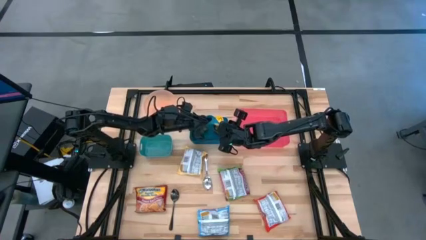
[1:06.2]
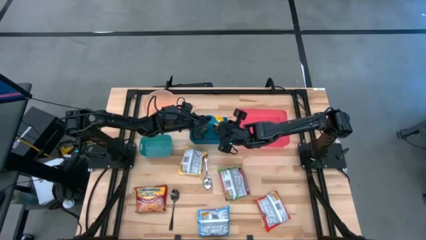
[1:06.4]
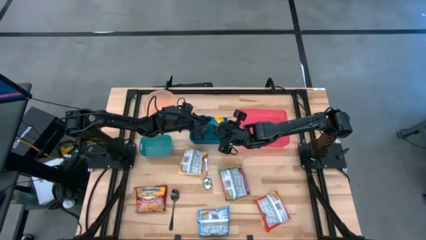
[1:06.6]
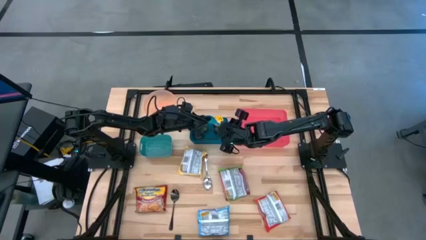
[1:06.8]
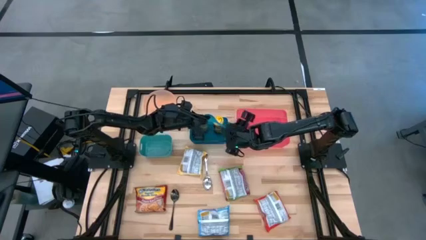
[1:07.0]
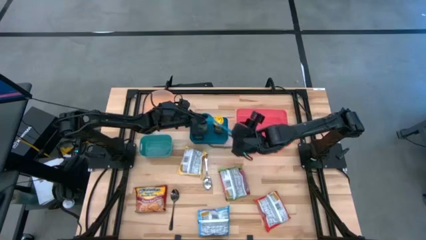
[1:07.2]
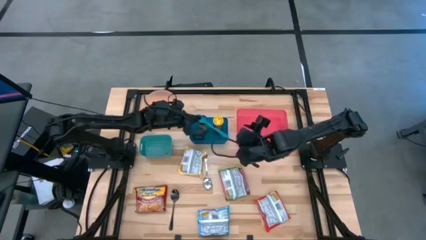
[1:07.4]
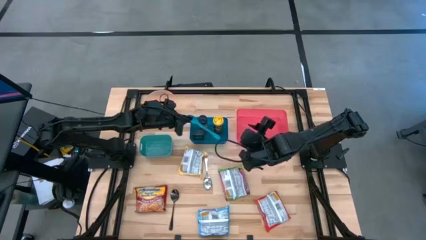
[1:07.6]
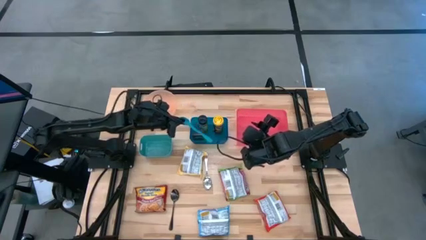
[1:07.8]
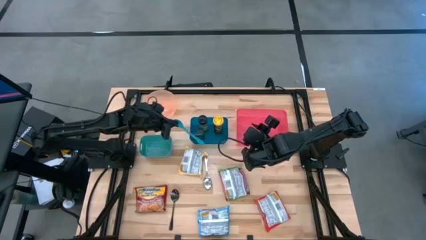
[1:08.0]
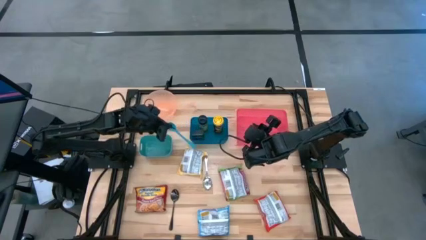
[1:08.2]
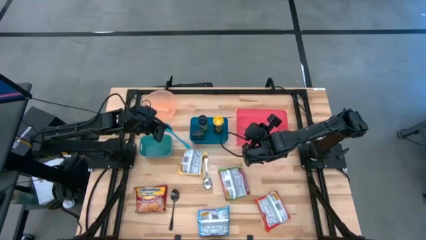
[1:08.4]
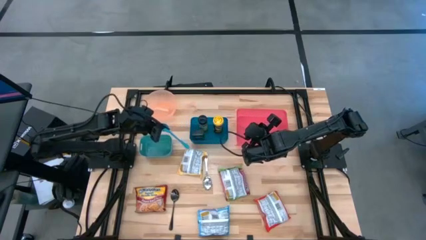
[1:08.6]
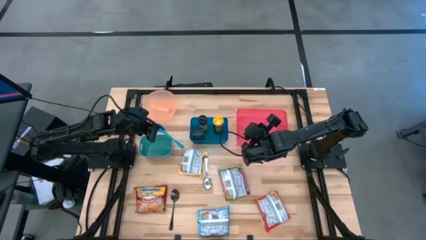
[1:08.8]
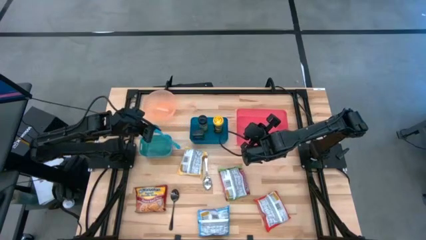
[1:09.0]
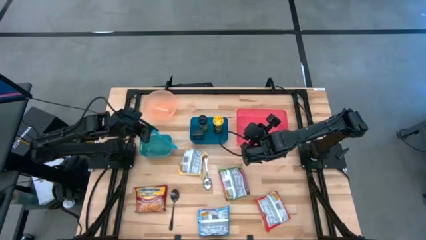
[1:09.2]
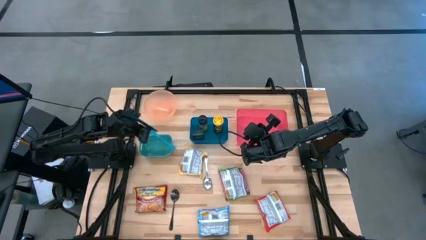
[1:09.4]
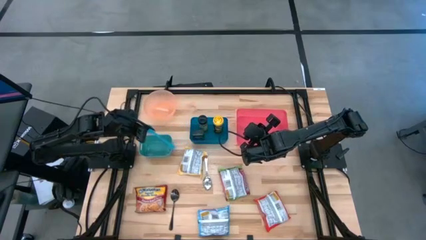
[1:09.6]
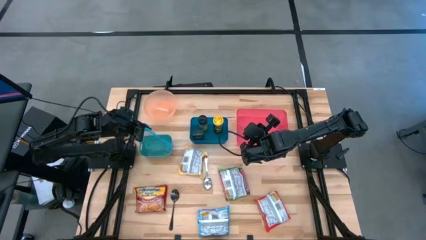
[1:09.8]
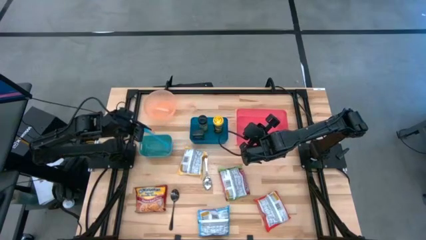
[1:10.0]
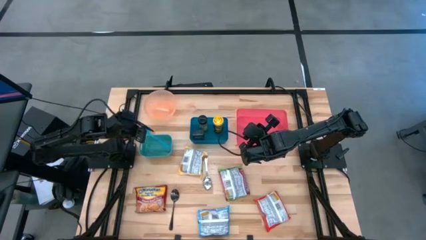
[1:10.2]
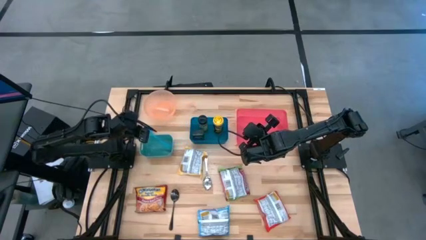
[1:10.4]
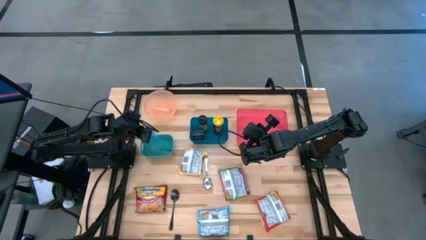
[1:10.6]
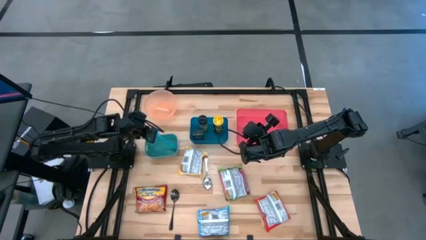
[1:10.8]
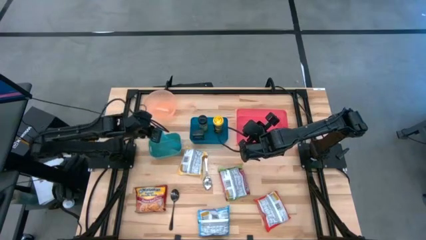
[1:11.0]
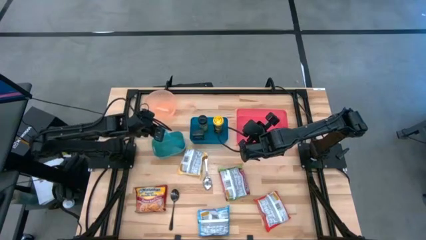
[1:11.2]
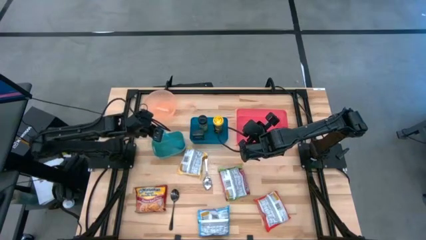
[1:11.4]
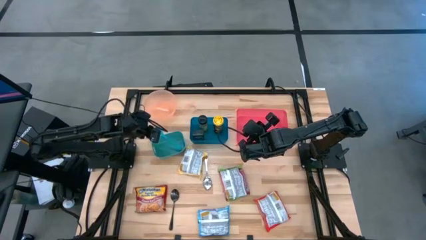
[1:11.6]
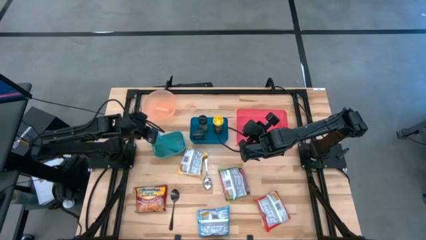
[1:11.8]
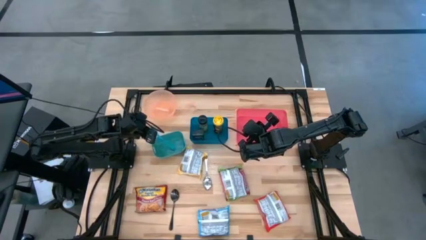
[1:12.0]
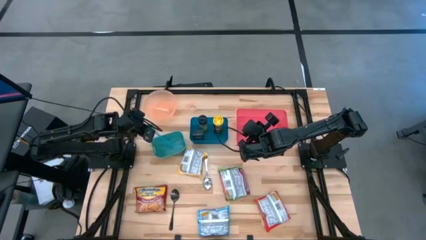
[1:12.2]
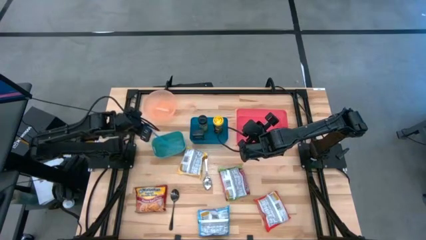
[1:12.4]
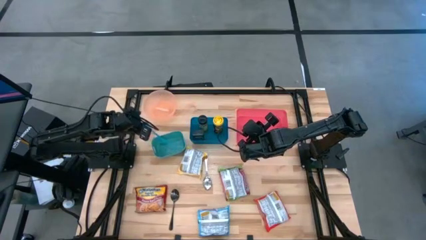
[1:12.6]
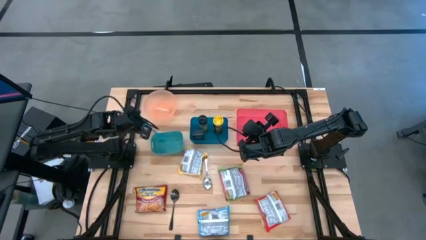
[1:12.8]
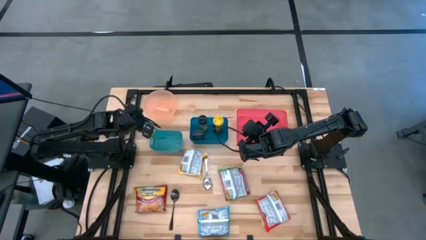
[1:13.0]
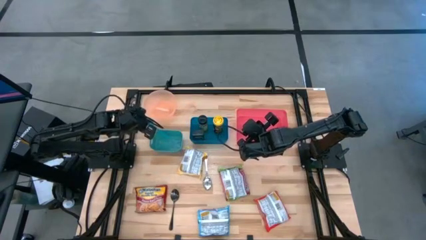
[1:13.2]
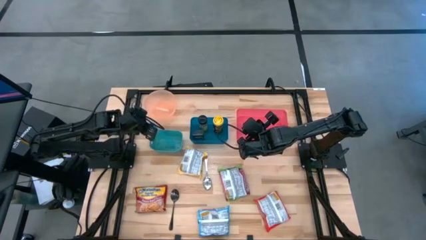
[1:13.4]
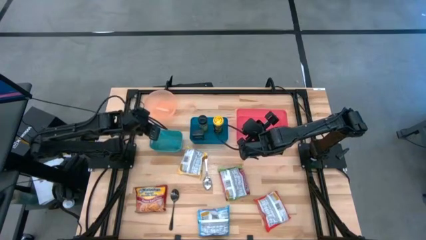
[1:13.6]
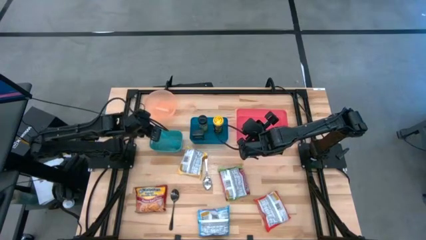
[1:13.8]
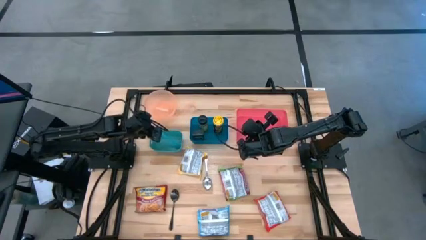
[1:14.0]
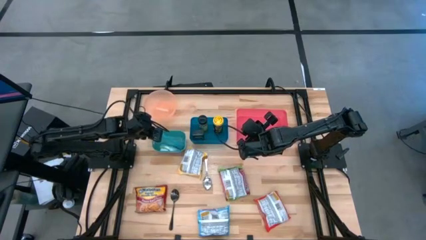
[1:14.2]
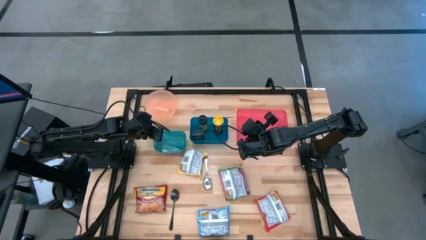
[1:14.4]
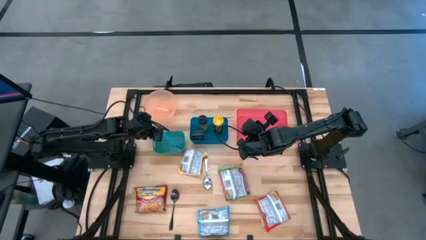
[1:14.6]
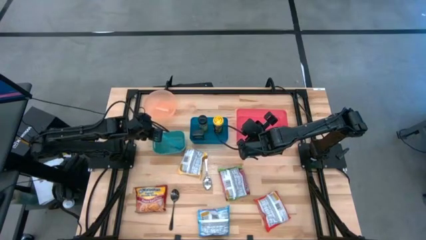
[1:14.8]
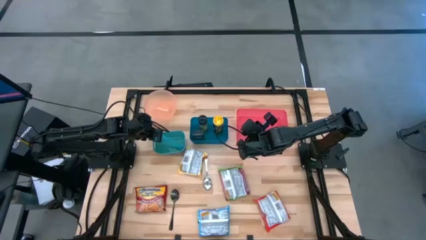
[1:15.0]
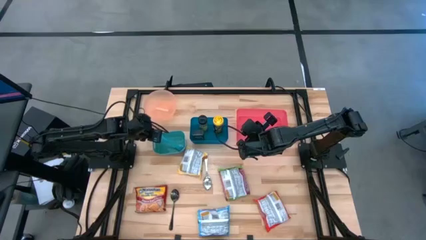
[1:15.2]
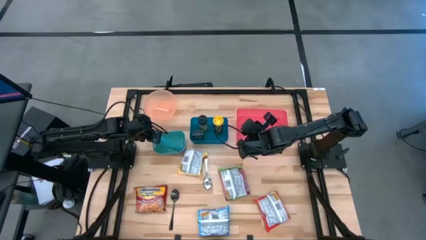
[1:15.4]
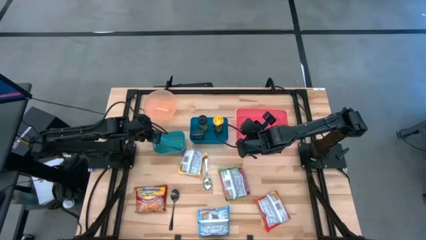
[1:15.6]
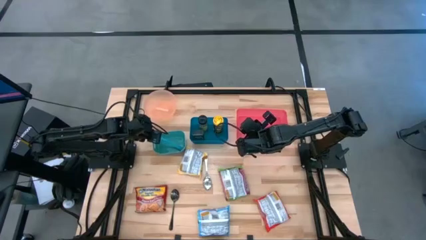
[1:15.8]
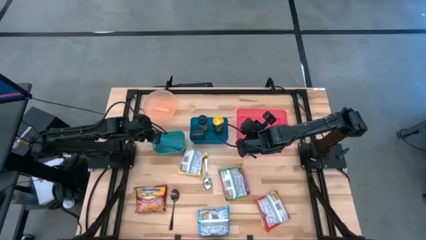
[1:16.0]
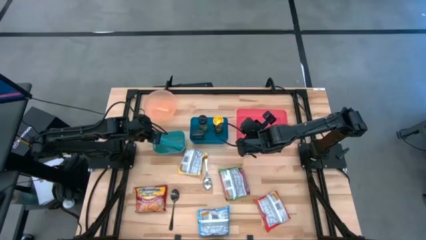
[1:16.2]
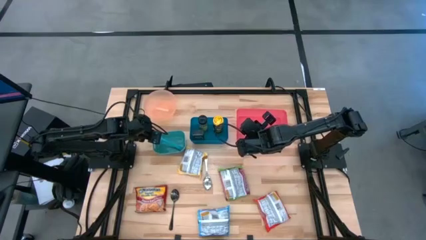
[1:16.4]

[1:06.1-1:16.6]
Task: Pick & Place Food Item
Put the blue spoon into the green bin

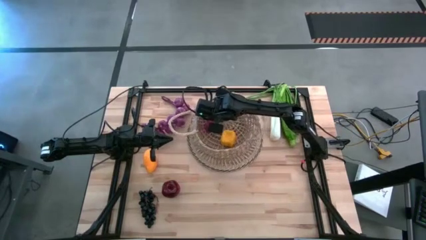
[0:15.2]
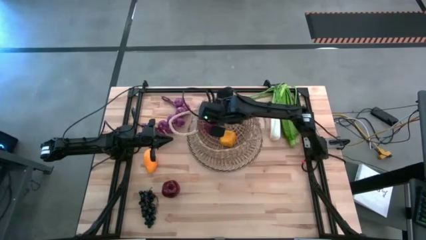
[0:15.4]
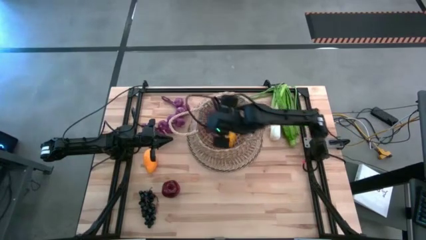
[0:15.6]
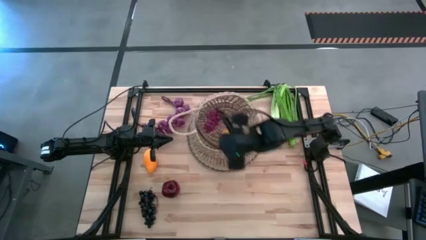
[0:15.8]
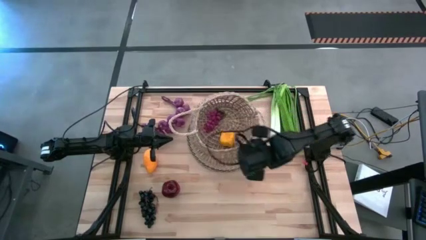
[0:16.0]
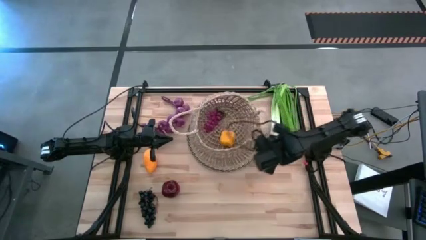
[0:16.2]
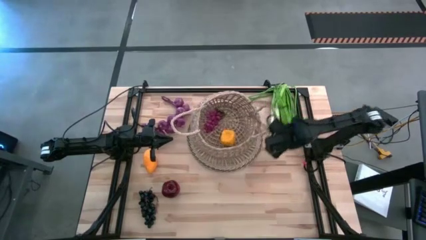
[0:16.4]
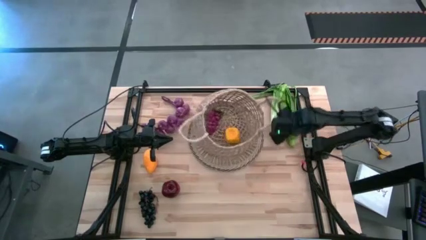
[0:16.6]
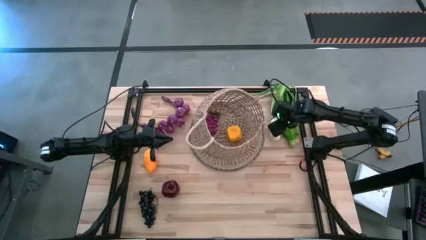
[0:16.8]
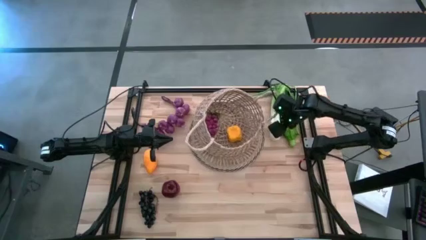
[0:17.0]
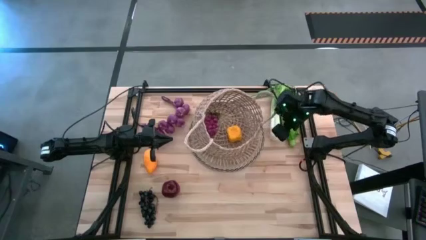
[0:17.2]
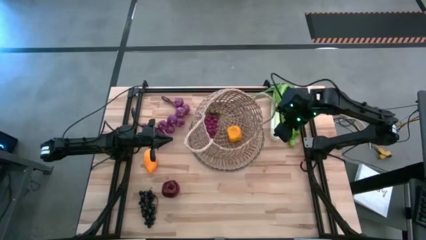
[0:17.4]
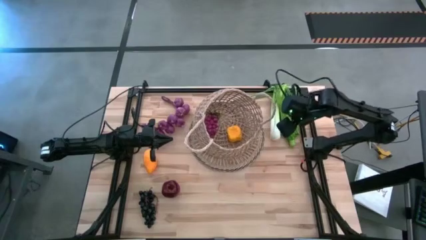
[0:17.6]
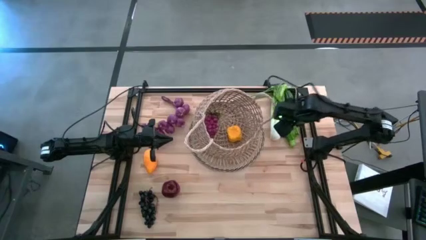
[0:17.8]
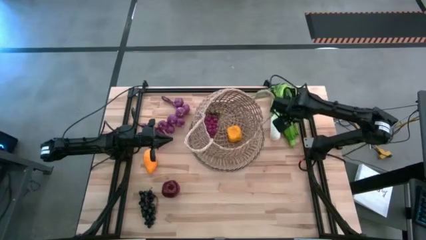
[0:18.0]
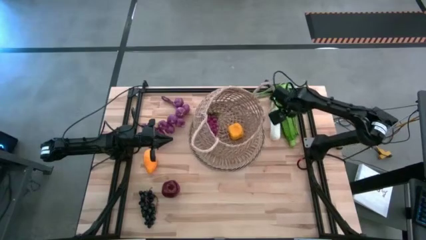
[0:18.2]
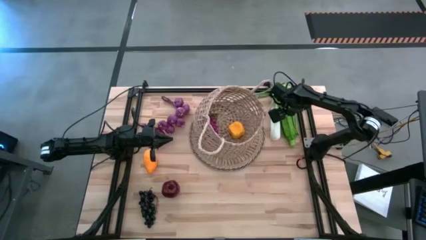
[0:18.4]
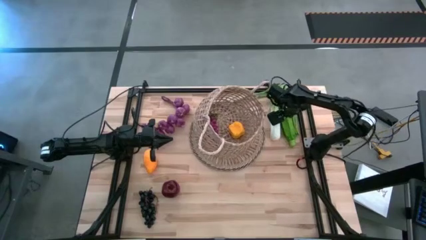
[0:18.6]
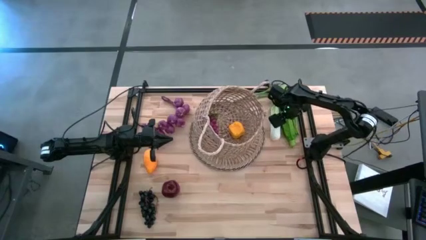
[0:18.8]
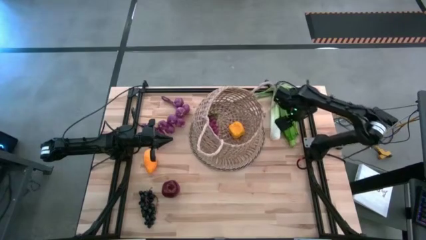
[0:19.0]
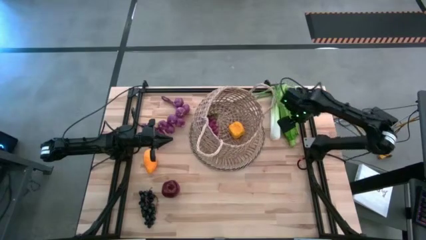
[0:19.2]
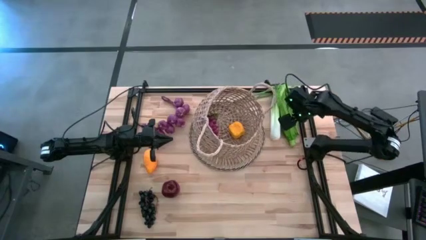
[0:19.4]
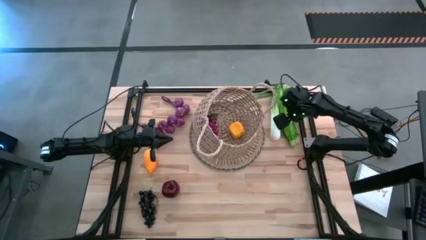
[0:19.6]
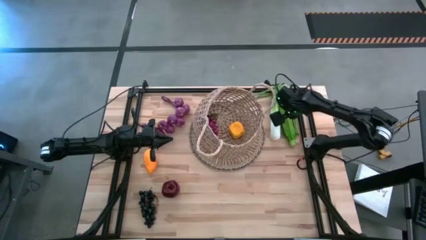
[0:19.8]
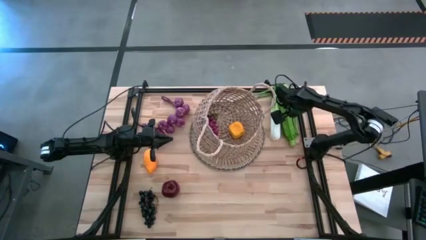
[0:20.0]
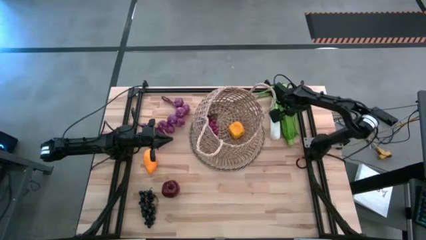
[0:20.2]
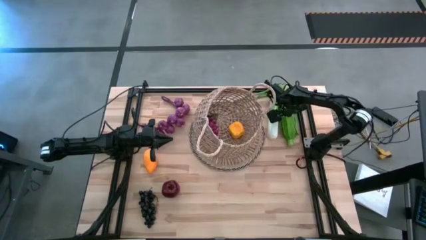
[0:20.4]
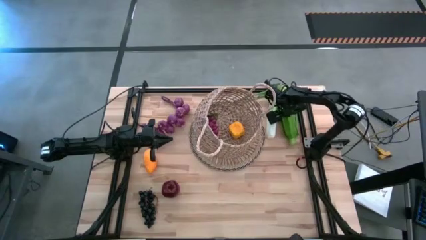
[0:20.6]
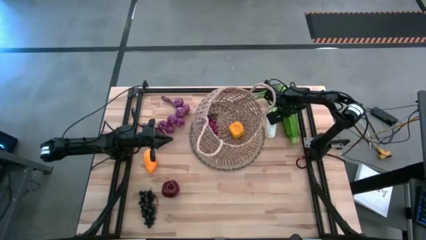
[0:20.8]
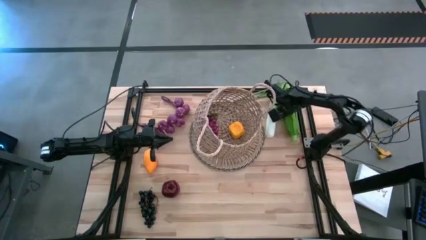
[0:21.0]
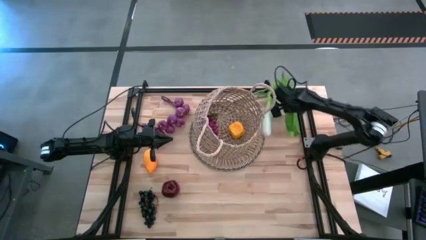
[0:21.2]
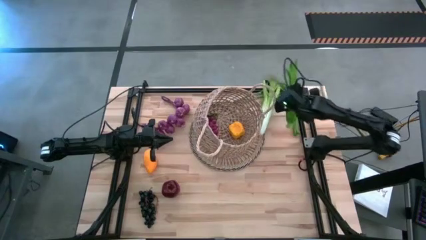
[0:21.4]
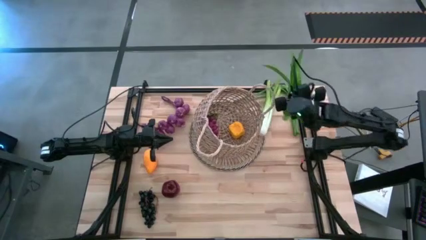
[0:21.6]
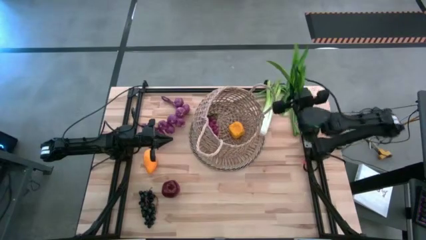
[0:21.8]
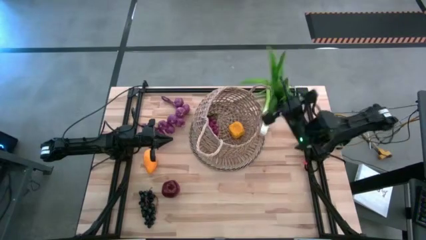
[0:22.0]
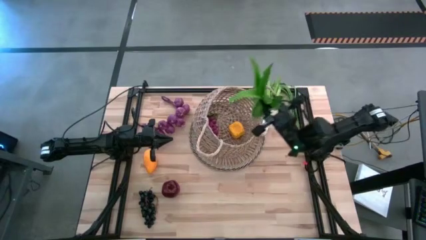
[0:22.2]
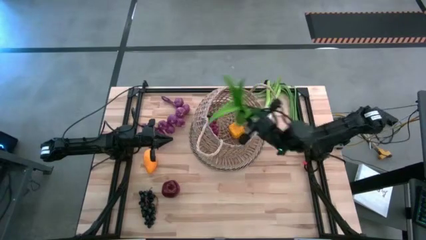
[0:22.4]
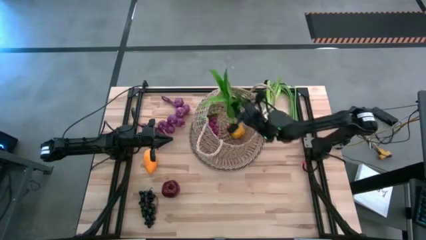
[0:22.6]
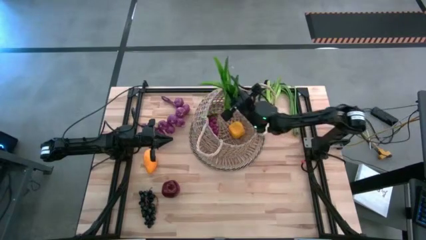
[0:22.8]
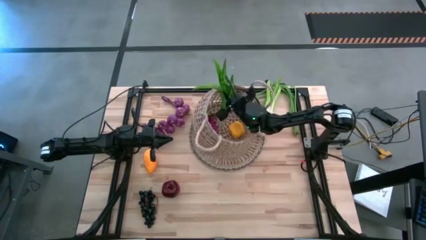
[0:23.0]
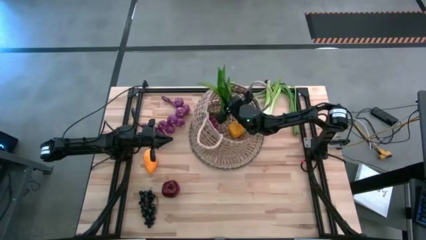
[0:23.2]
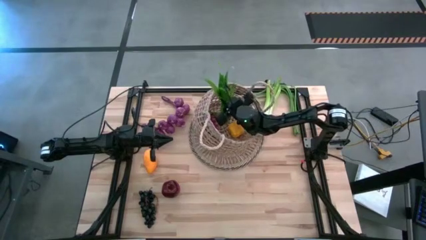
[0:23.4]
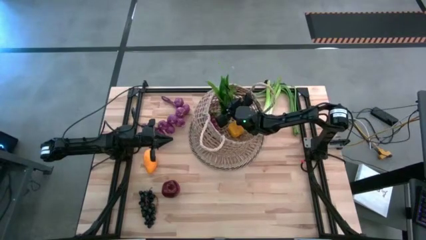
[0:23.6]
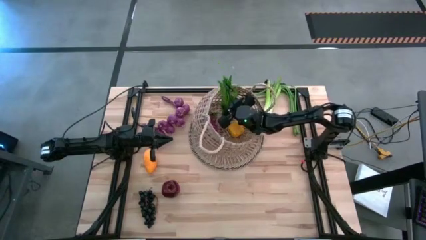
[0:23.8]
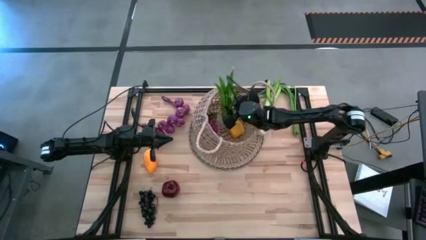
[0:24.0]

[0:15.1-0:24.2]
Task: Build produce basket
Put the aloe vera into the basket
